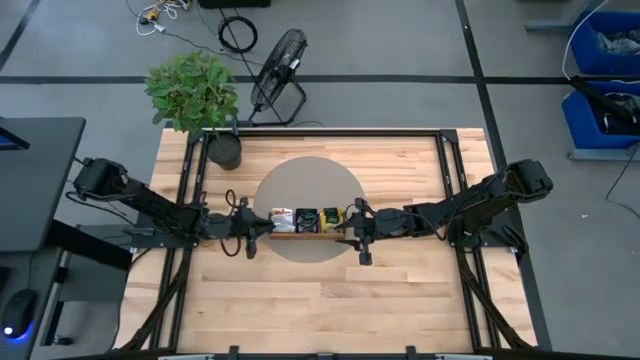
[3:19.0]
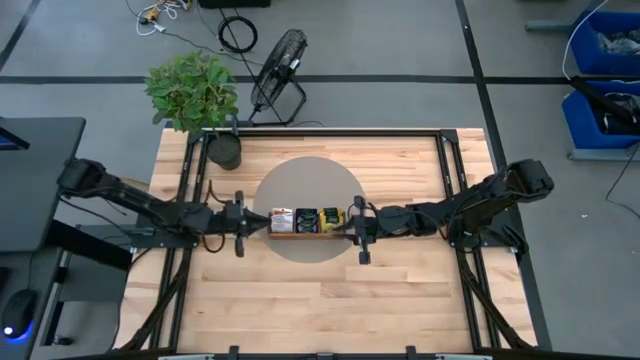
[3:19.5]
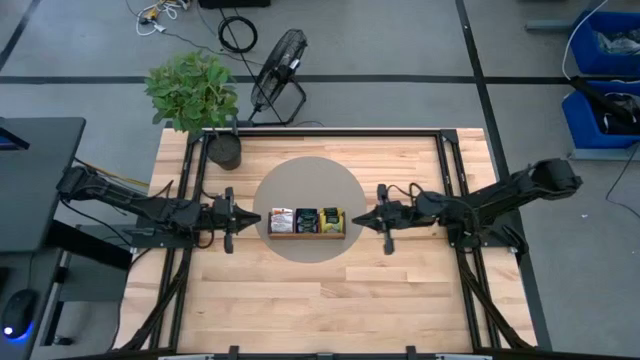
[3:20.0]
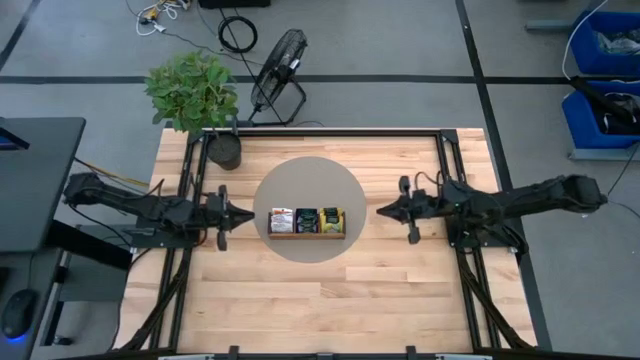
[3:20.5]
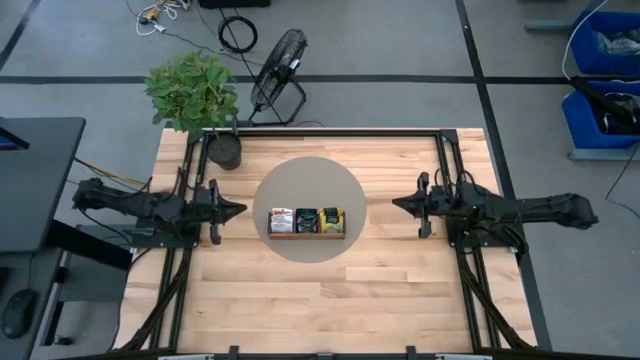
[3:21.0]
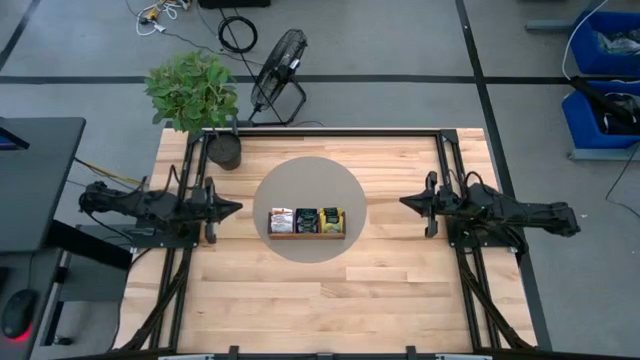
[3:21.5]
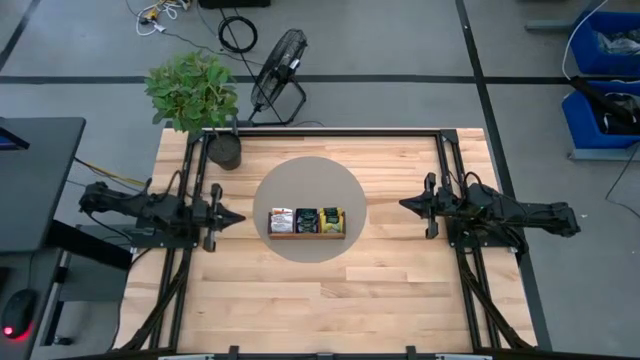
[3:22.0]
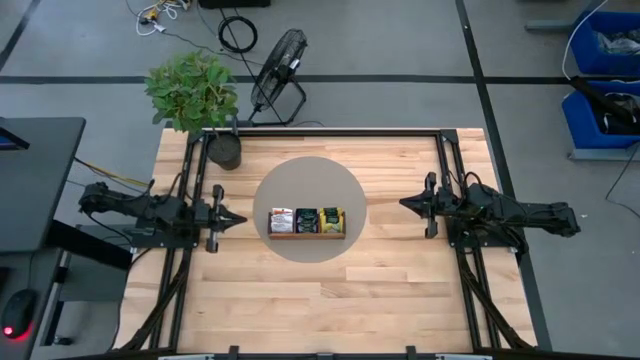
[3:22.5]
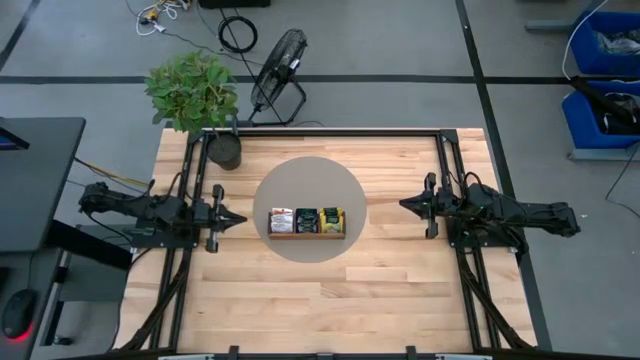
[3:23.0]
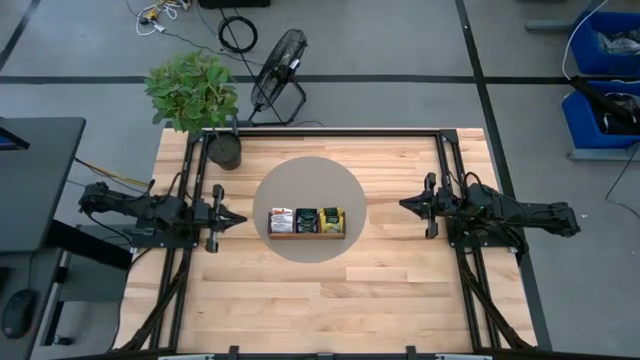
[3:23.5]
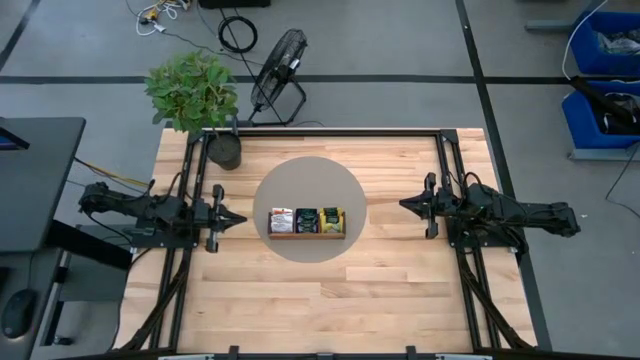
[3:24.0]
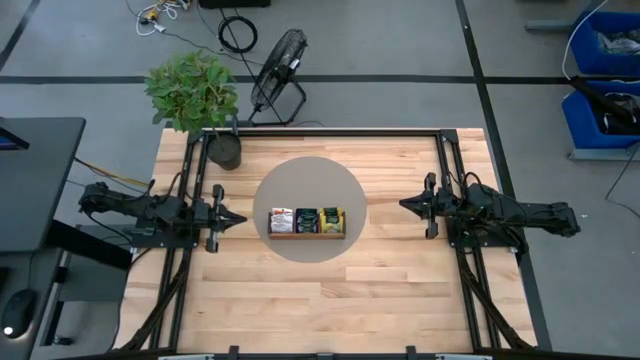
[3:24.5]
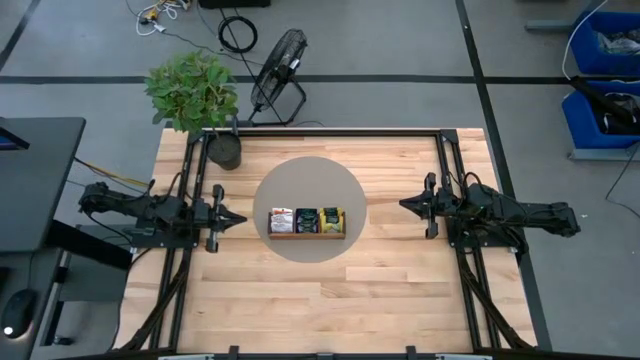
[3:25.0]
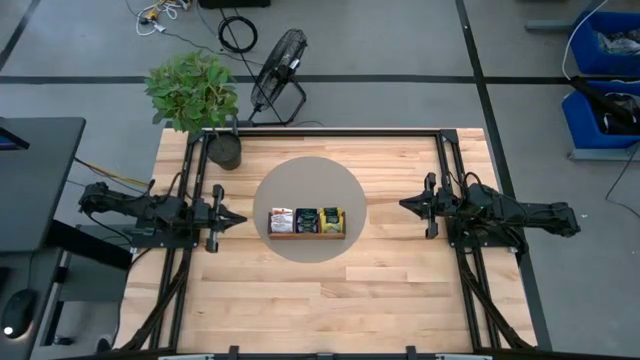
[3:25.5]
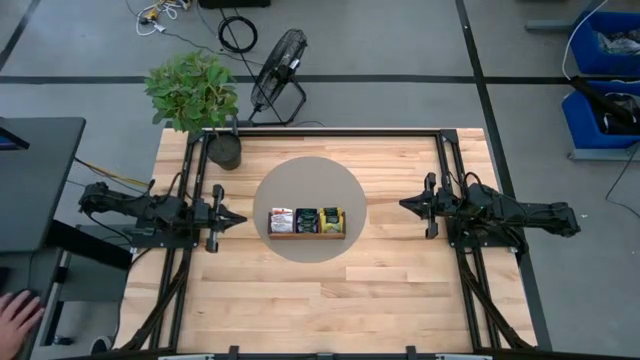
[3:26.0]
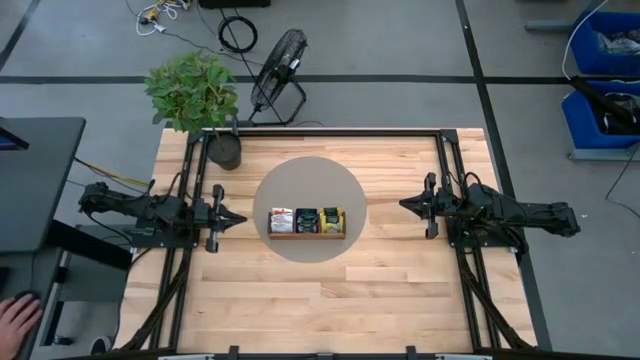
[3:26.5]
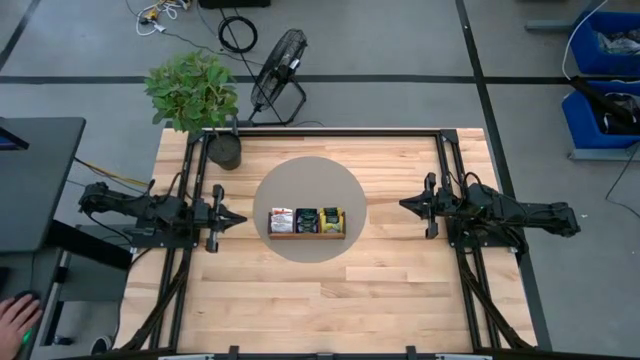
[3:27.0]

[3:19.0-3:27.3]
Task: Pick & Place Tea
Return to Home Position

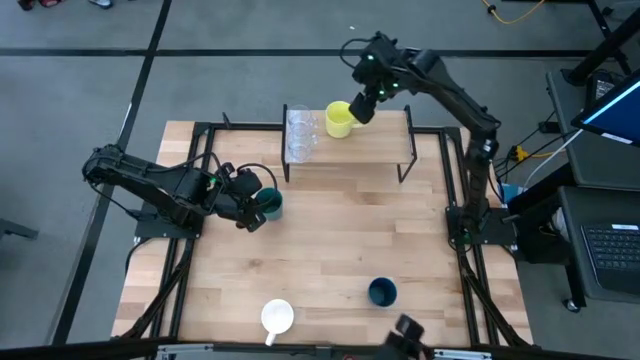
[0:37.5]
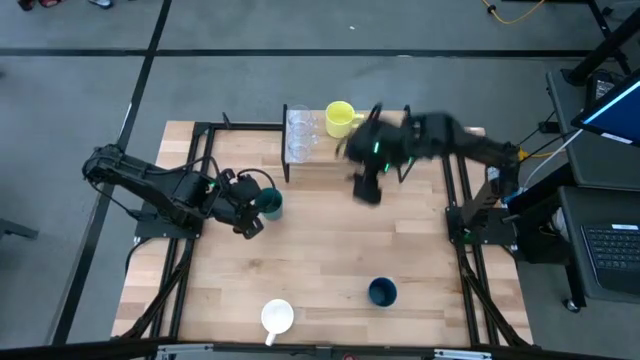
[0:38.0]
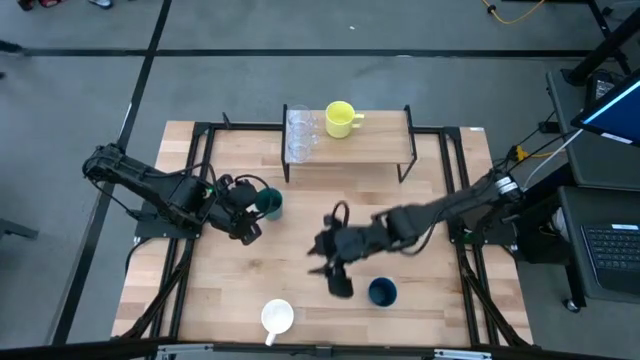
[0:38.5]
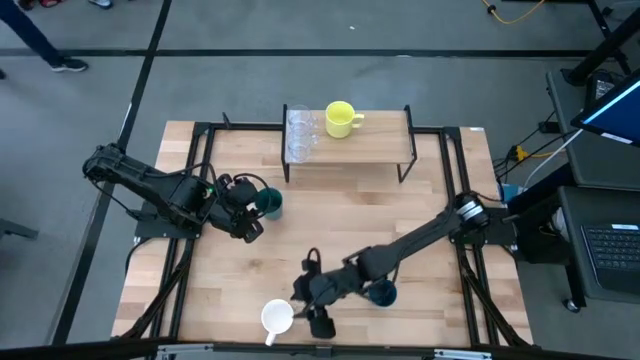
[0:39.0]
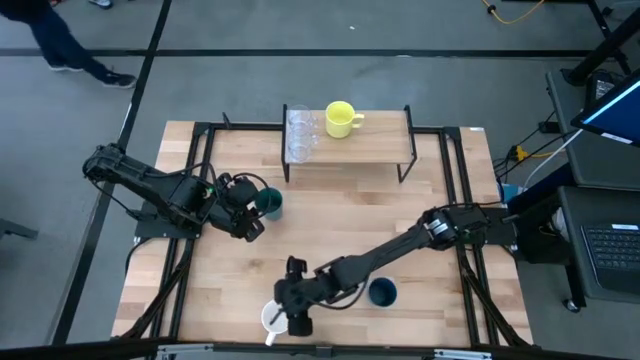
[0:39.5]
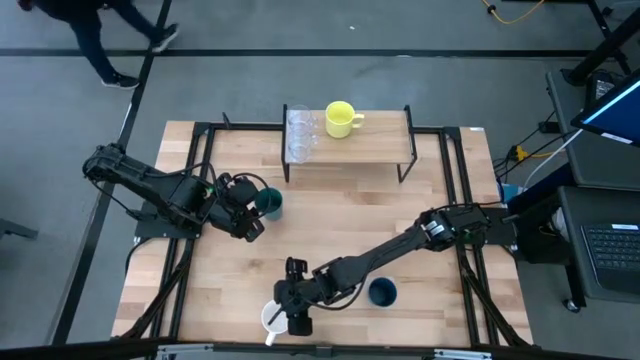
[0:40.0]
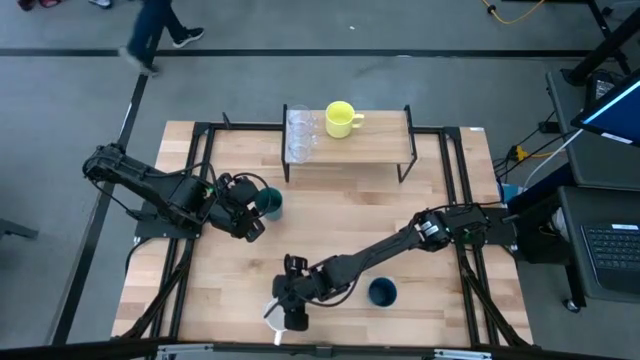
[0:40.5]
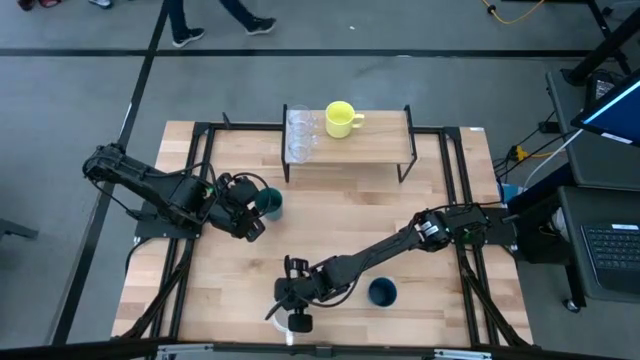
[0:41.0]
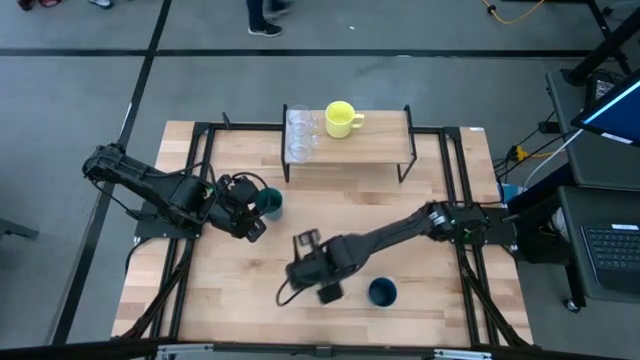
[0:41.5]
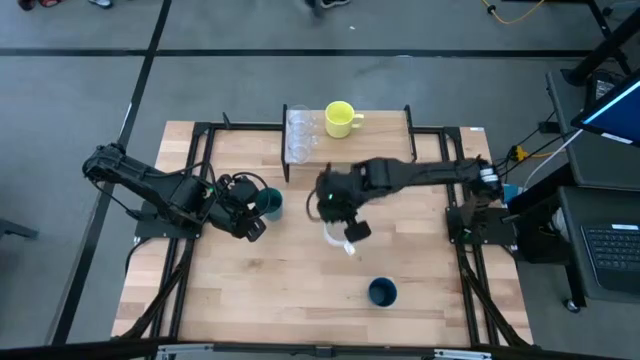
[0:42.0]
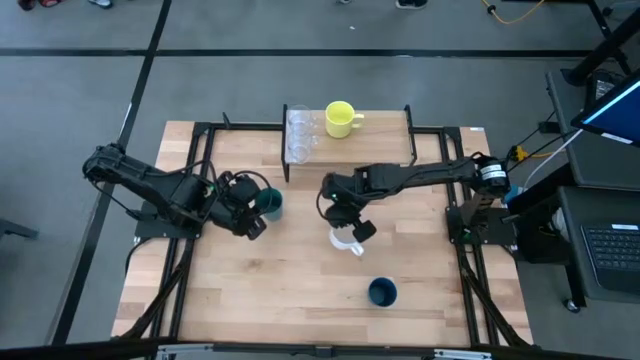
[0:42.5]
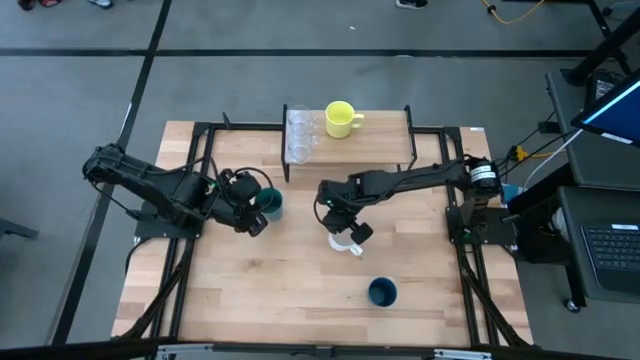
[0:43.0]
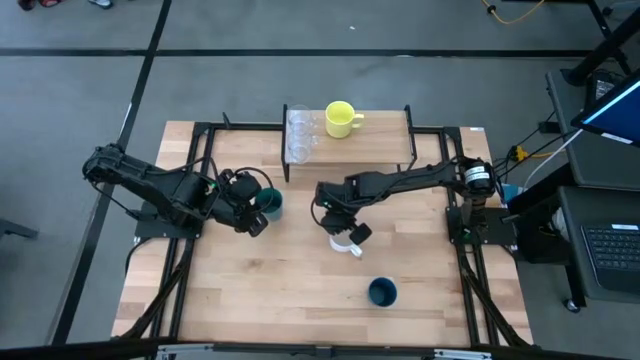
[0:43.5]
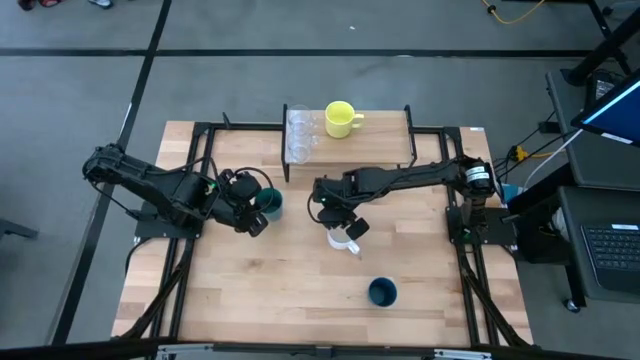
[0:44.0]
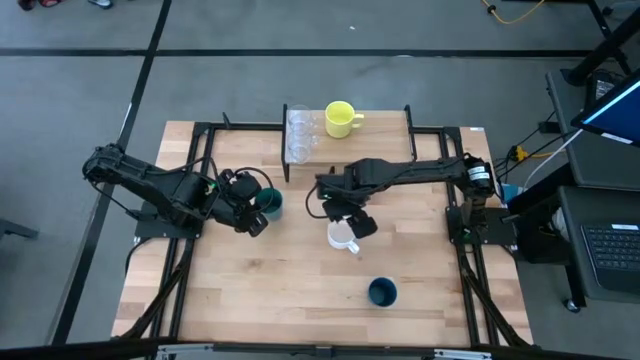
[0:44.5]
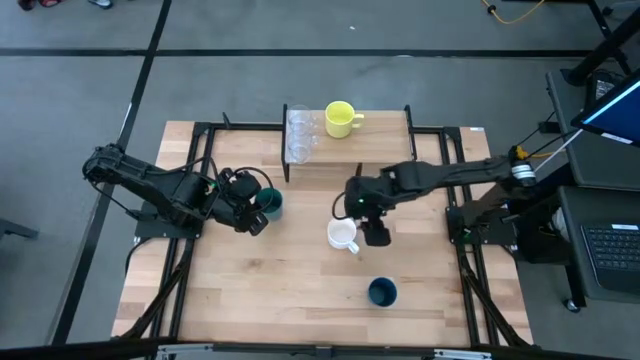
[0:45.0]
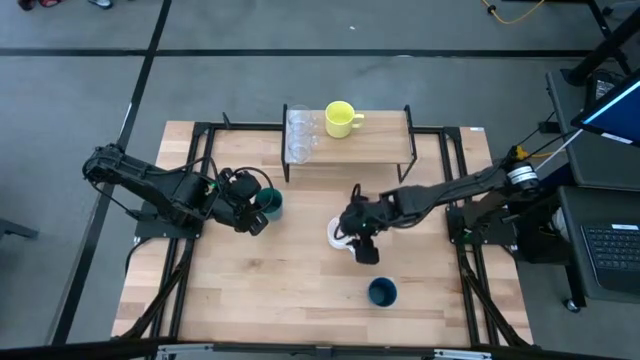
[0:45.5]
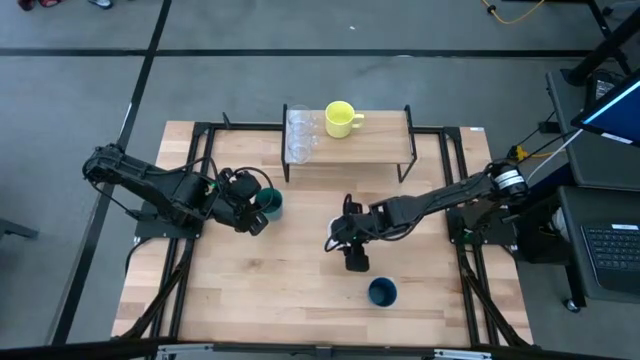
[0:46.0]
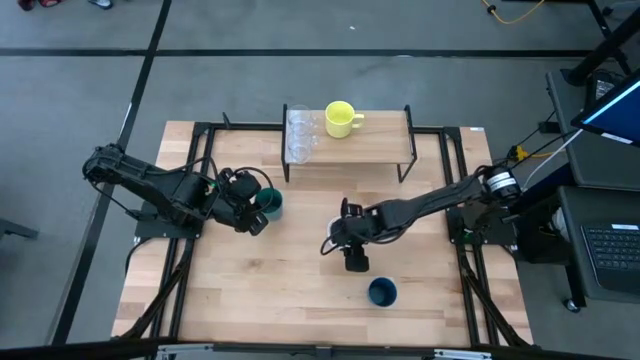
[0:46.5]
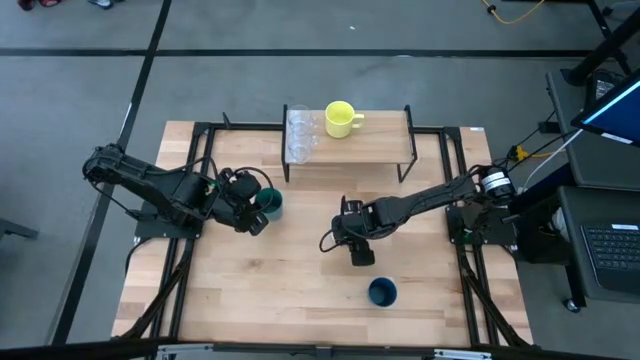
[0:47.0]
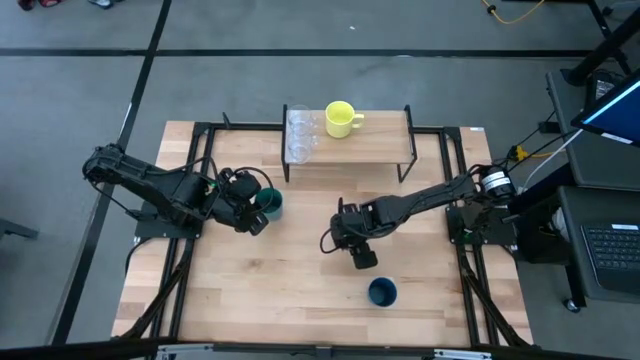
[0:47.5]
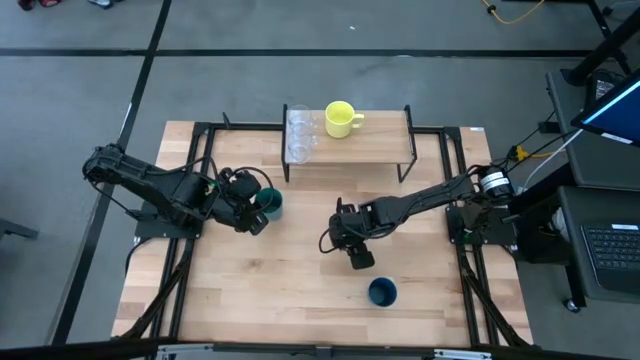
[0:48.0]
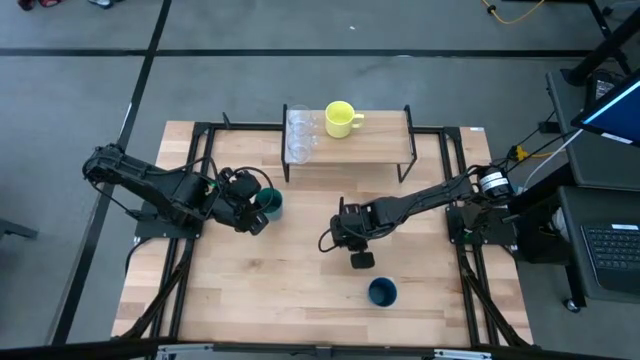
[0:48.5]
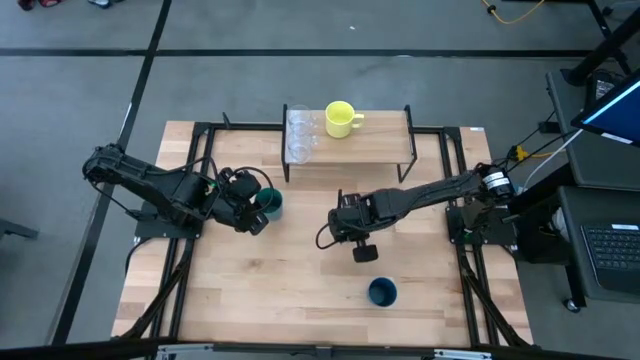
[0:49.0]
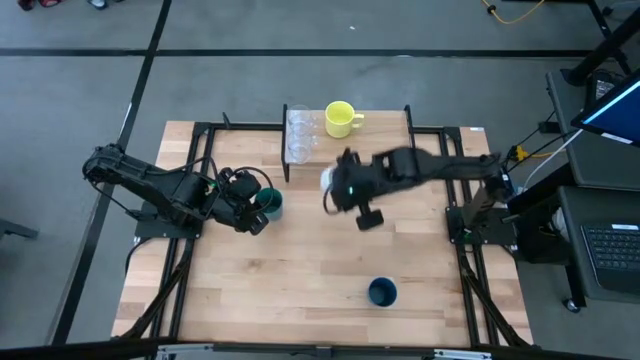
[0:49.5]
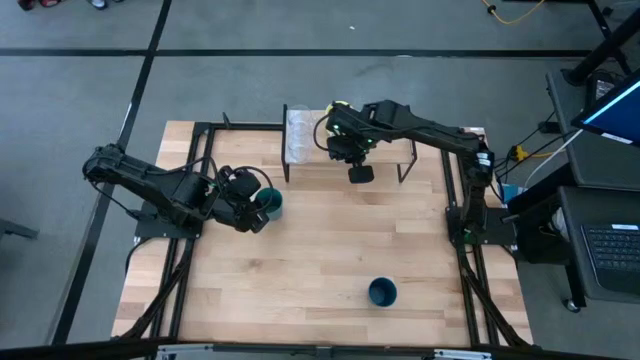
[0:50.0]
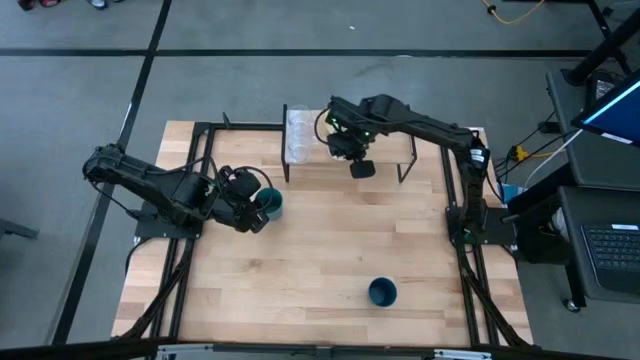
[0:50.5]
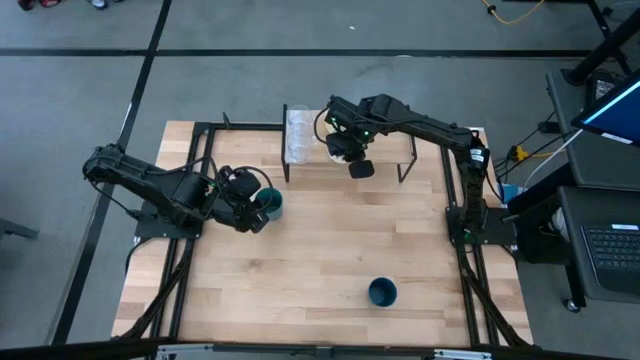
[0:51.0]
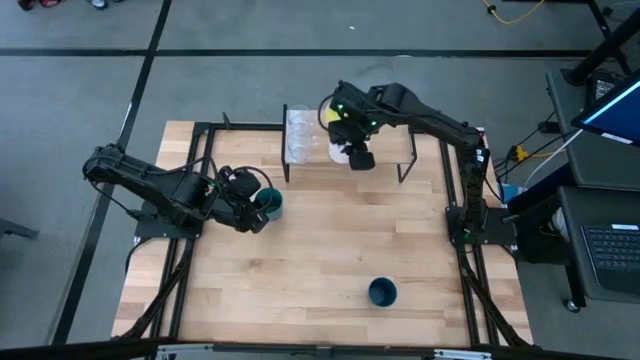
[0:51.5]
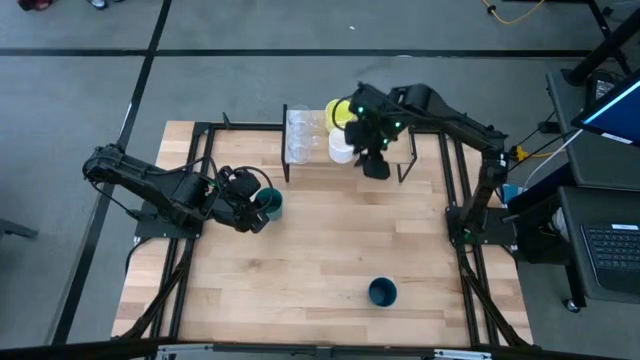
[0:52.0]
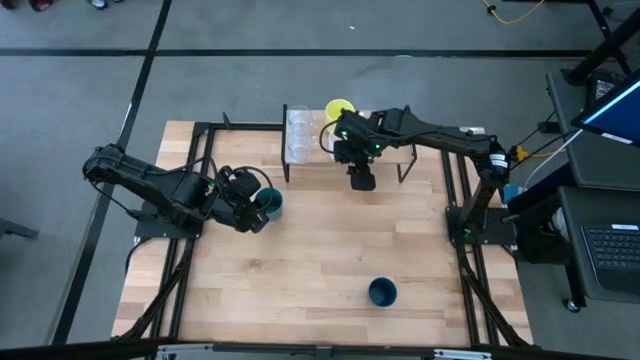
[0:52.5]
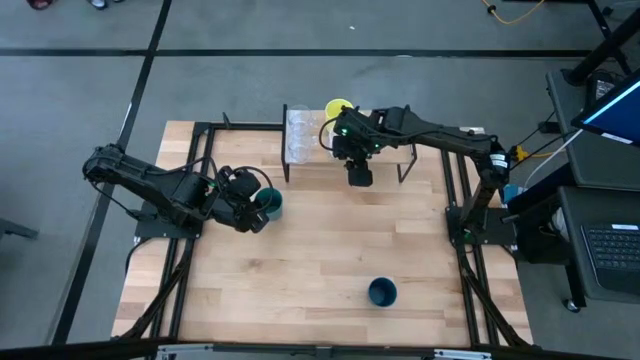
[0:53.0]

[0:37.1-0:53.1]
Task: Stack small to large cups/mugs on shelf
Put the white mug on the shelf, aligned with the yellow mug
